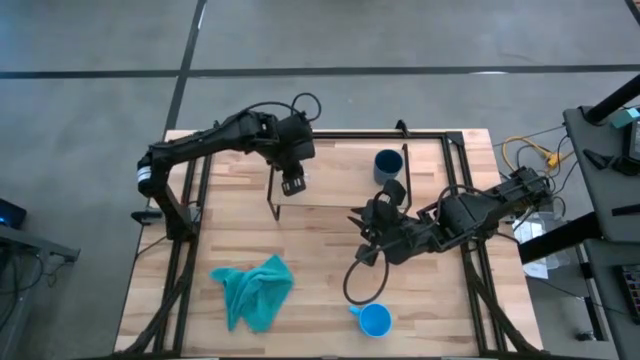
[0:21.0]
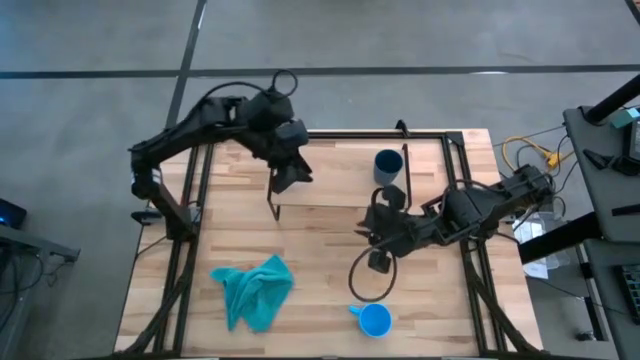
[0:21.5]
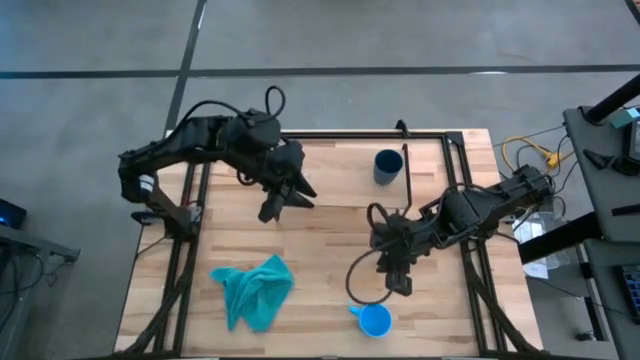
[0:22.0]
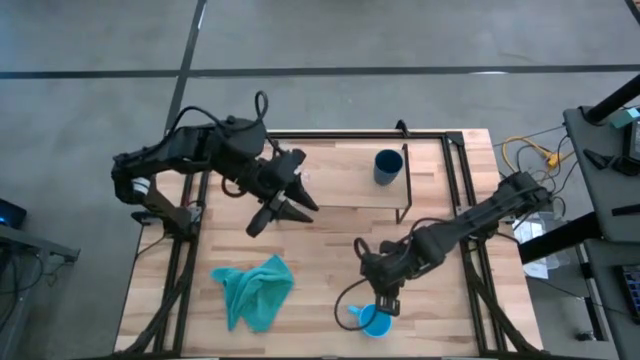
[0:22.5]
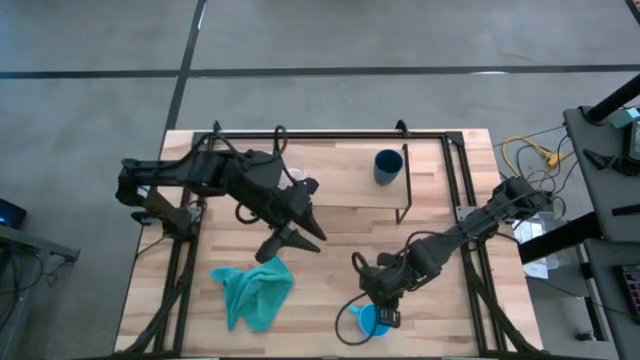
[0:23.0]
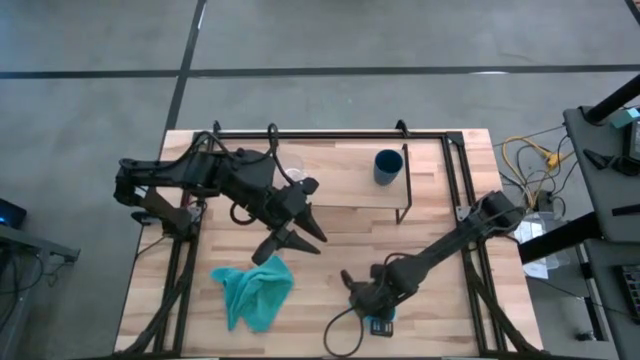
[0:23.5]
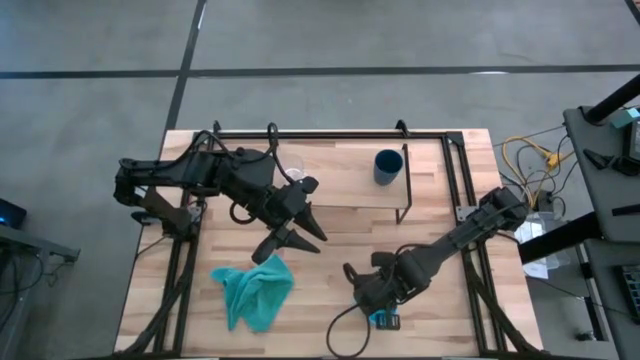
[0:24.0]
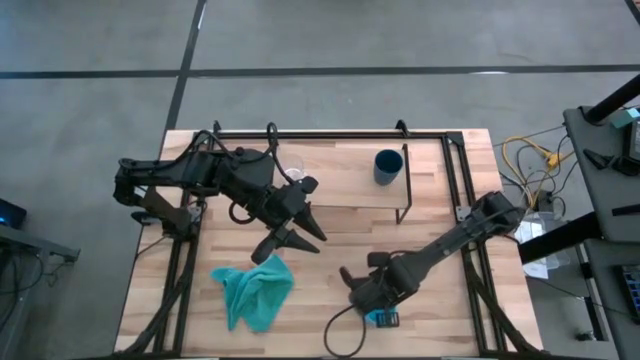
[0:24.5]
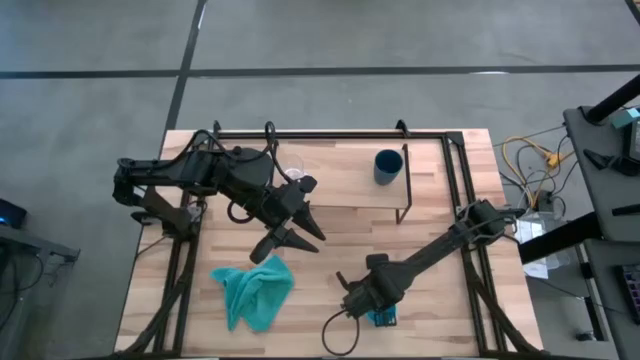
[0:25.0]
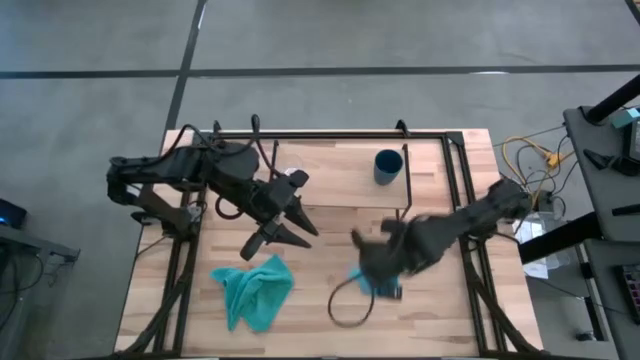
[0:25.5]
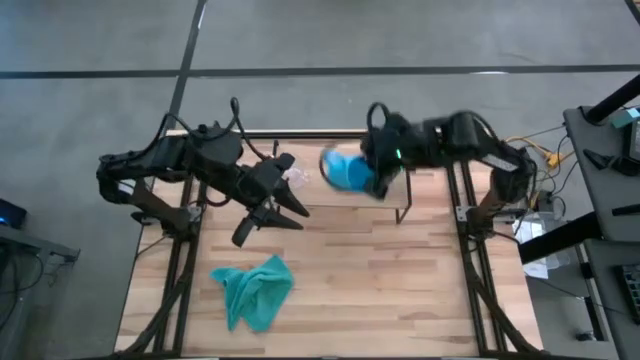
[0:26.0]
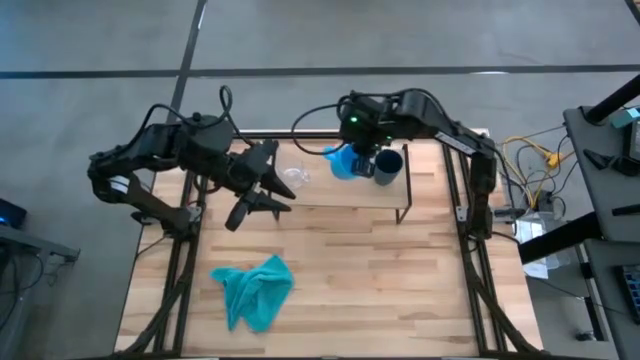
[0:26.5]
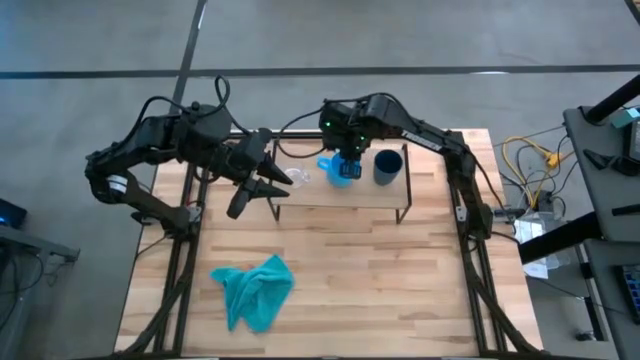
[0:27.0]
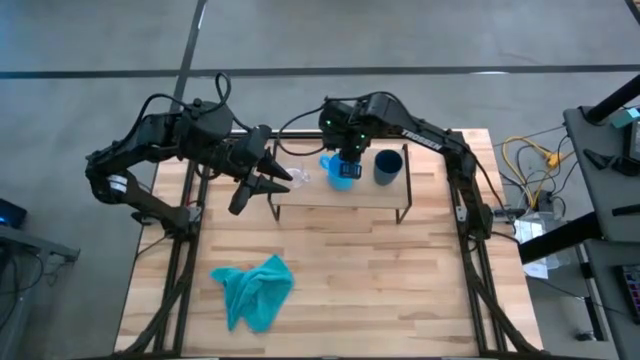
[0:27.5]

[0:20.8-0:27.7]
Task: Stack small to large cups/mugs on shelf
Put the light blue mug on the shelf

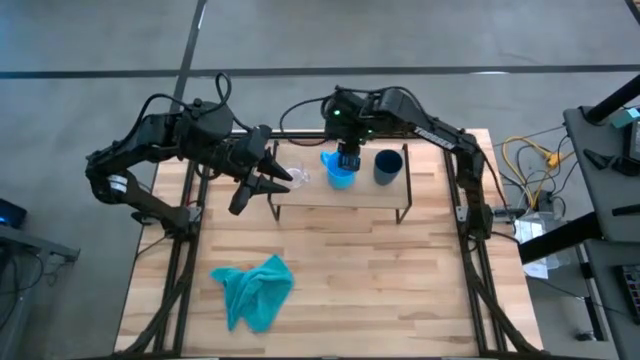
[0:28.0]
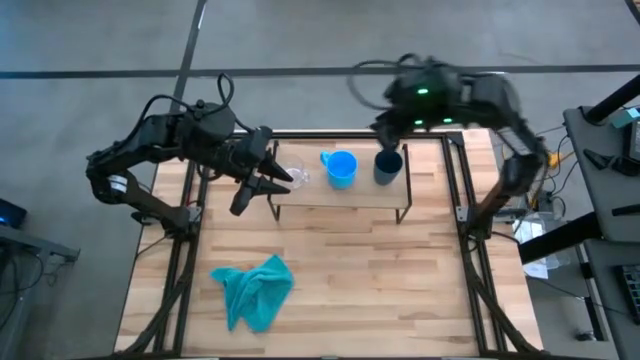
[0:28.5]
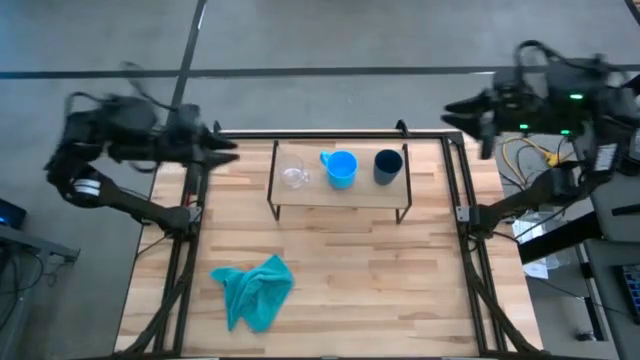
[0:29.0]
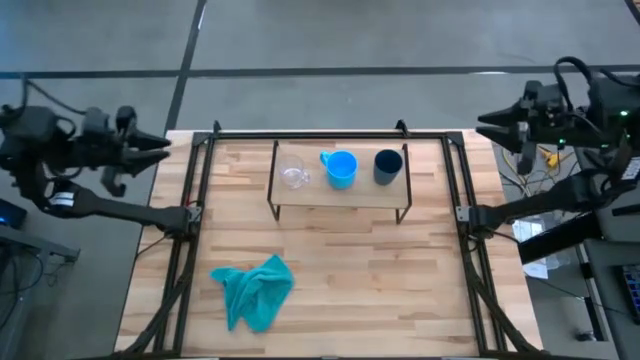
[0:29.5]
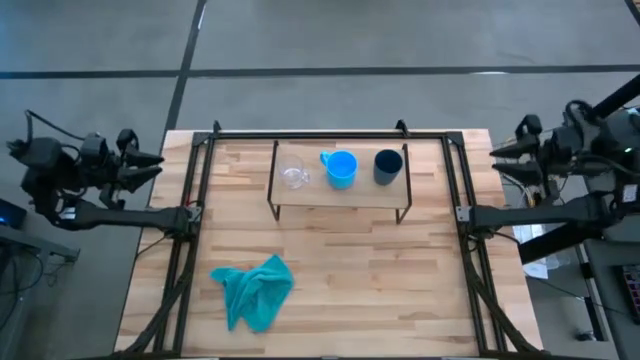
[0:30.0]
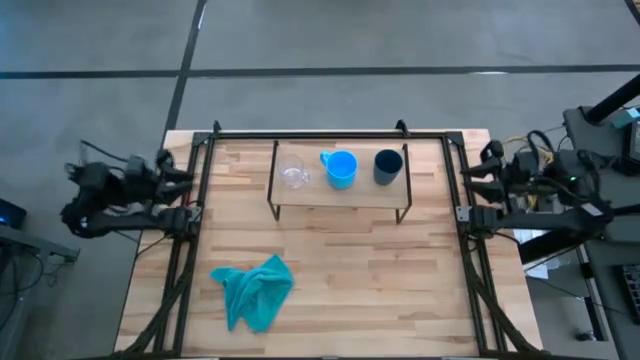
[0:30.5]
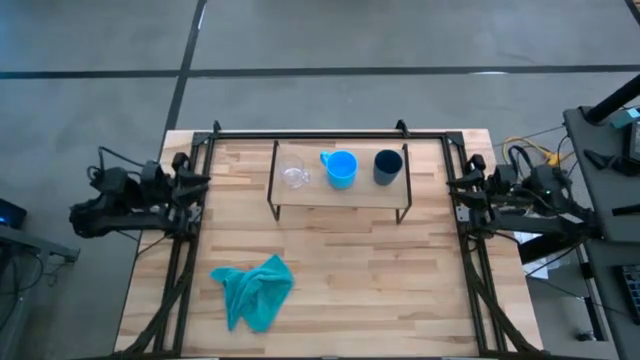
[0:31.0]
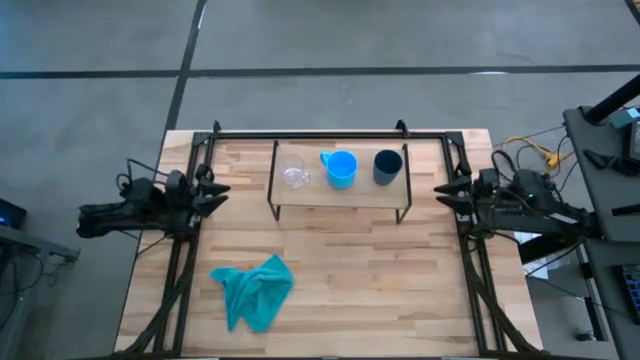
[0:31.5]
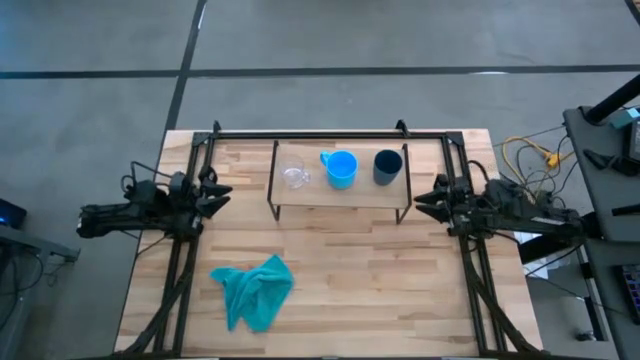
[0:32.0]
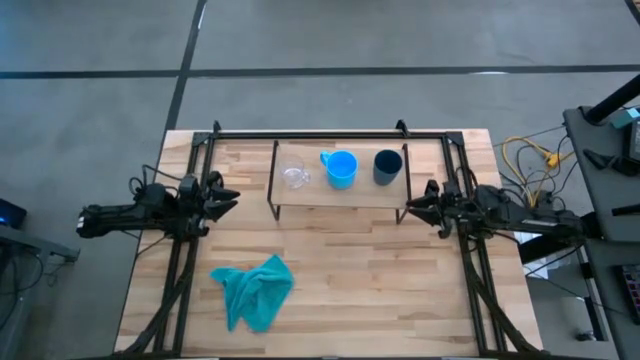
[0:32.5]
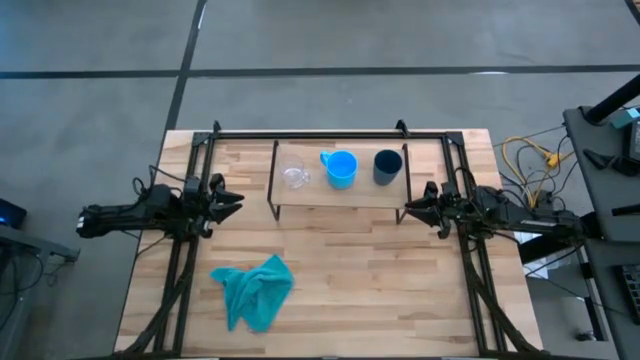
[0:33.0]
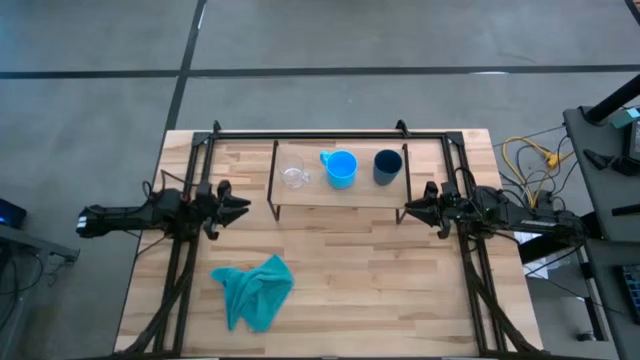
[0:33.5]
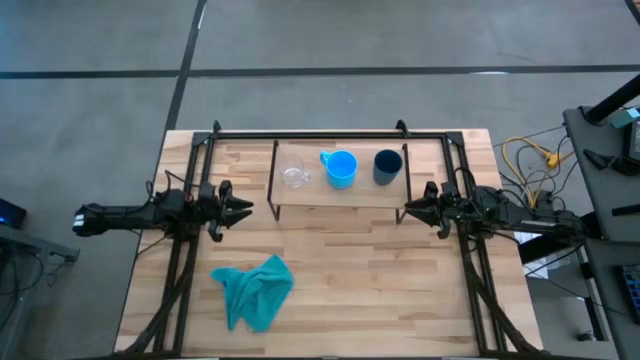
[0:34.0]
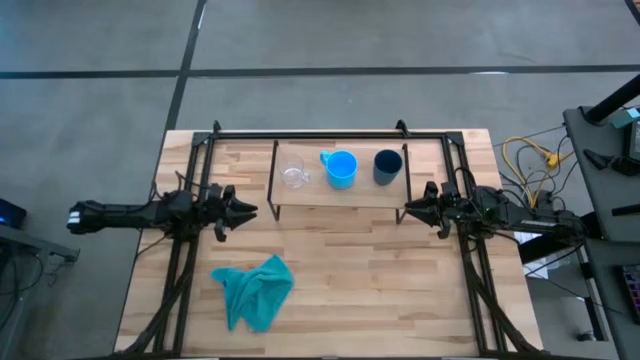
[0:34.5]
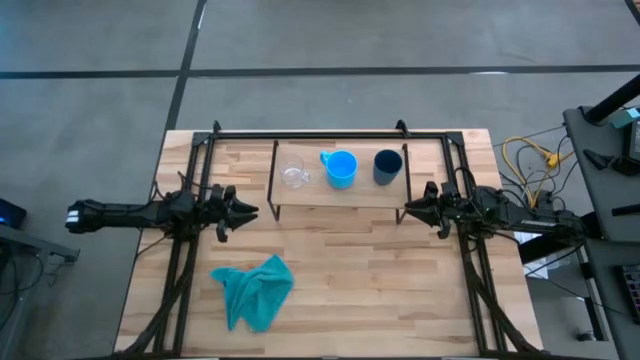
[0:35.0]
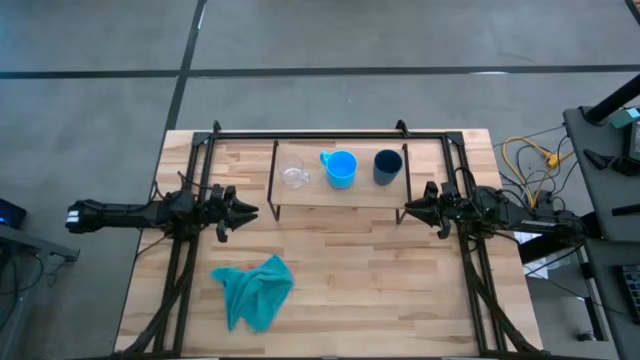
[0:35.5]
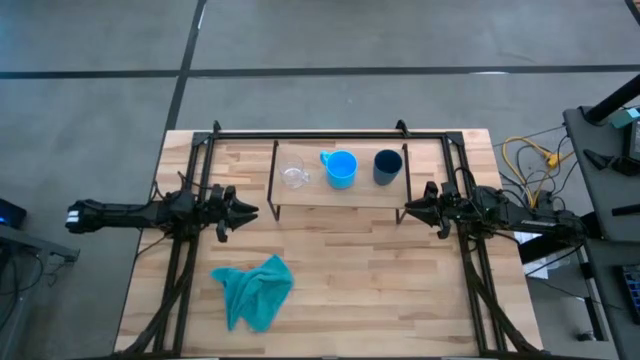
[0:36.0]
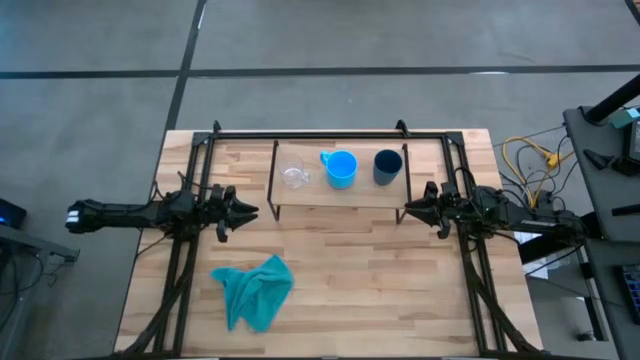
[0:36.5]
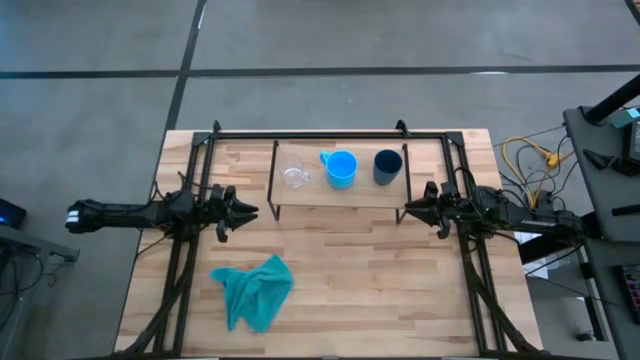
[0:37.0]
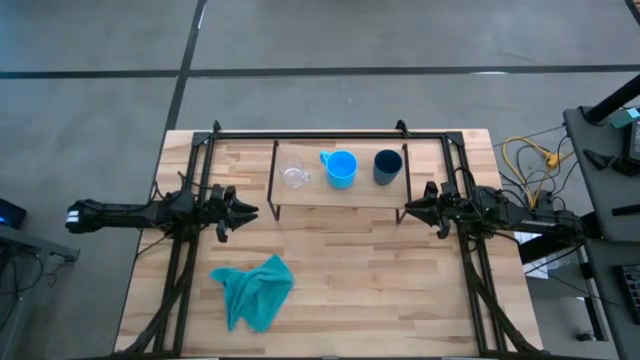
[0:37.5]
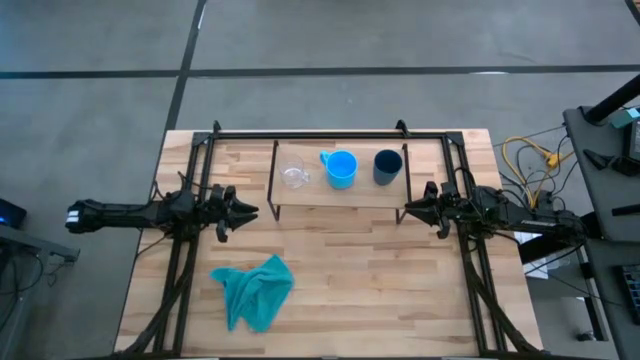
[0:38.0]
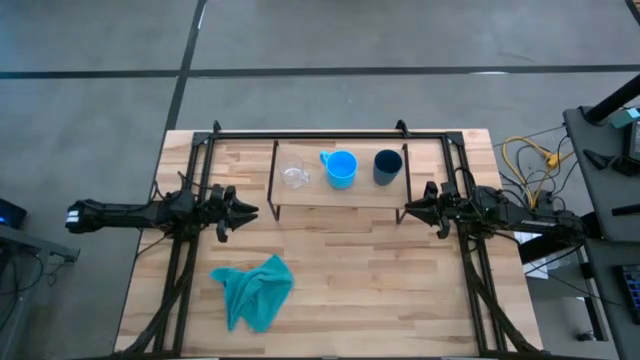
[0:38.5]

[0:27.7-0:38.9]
Return to Home Position

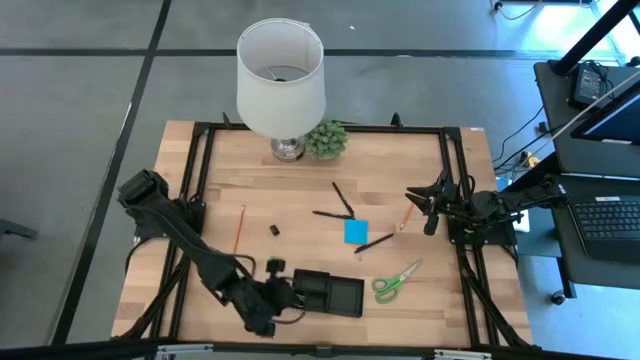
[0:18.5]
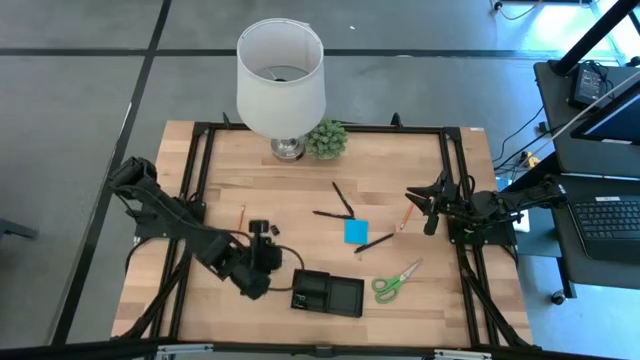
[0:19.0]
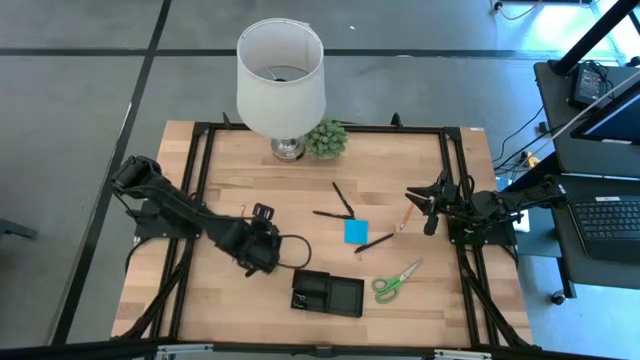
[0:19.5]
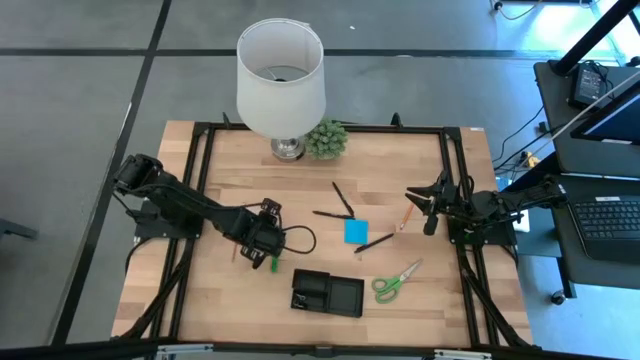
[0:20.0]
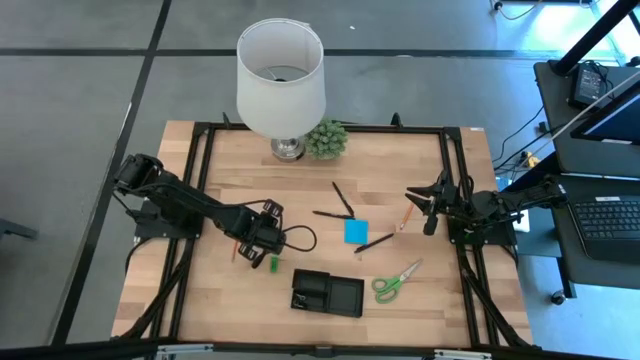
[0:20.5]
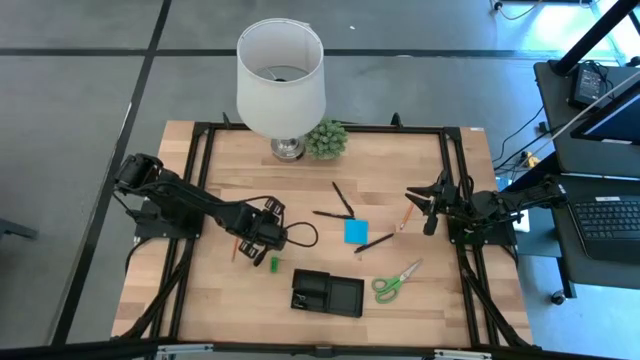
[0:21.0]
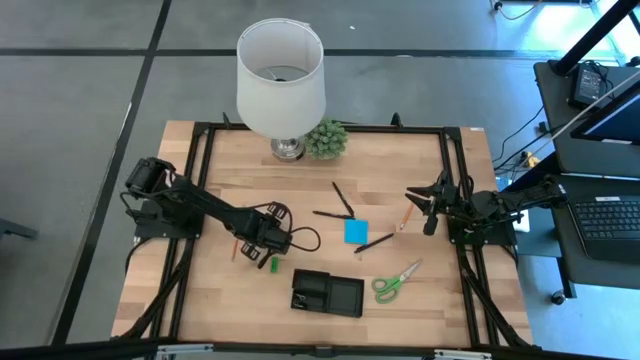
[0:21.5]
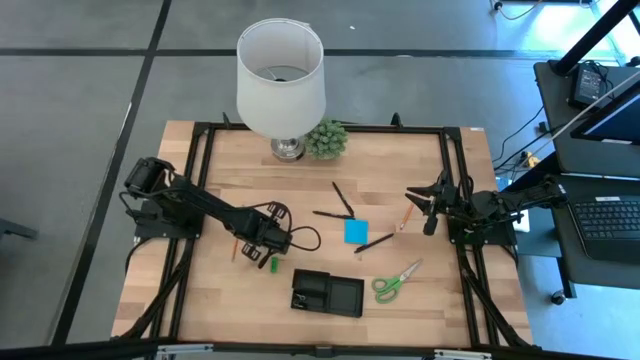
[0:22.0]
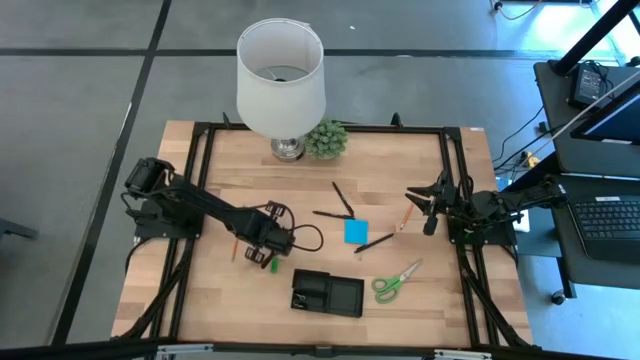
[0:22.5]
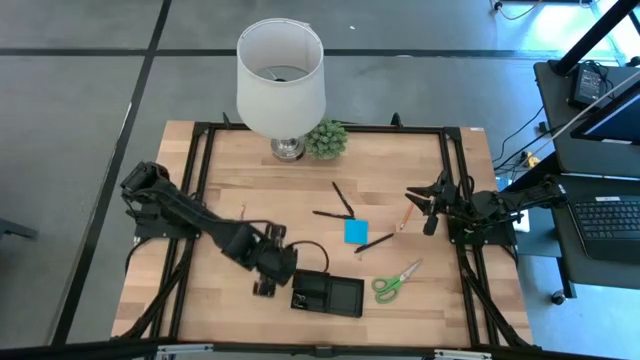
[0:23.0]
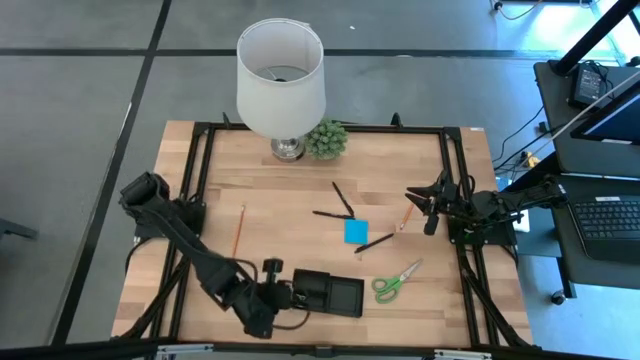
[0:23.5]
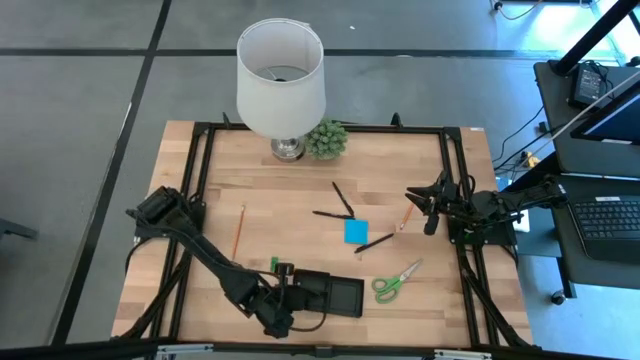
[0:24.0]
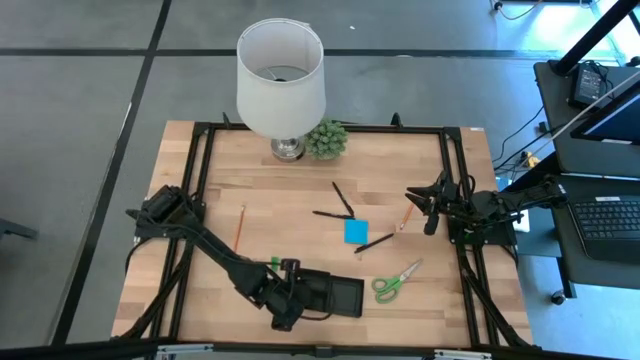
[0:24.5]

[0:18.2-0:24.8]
Task: Pick and place office supplies into organizer
Put the black binder clip into the desk organizer
